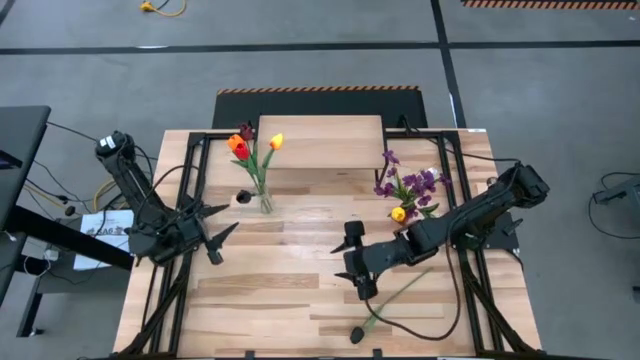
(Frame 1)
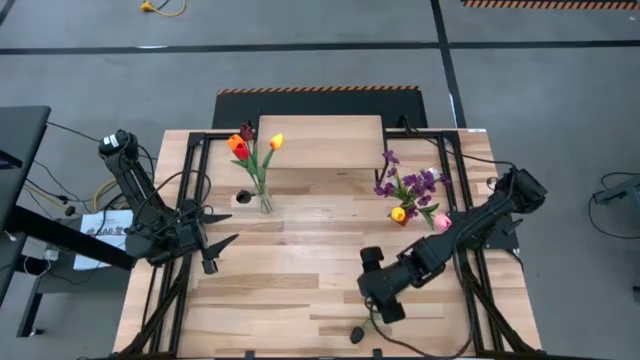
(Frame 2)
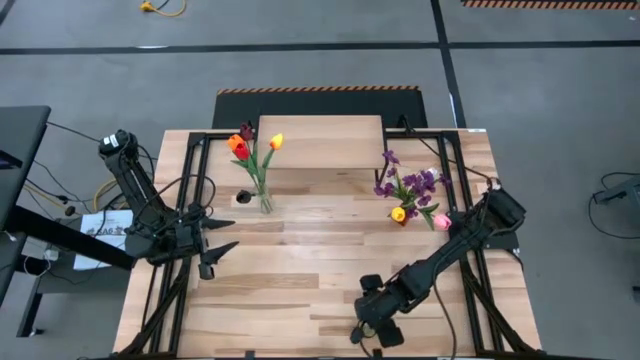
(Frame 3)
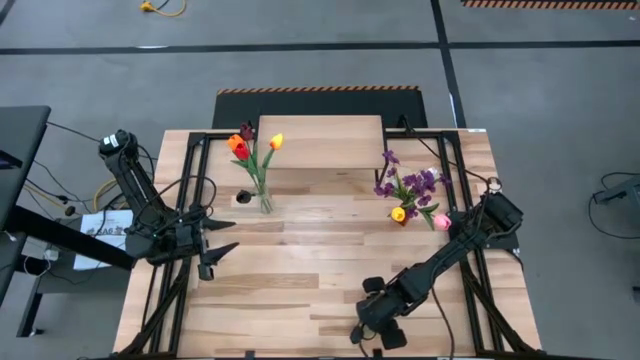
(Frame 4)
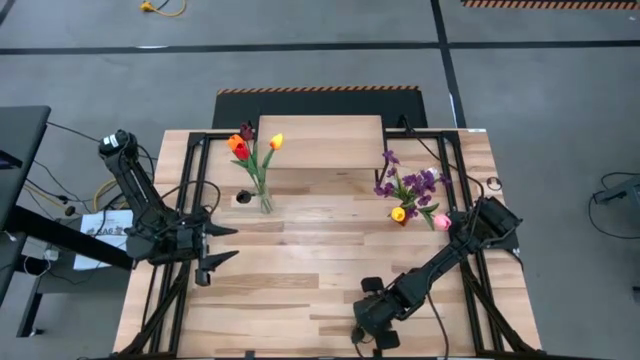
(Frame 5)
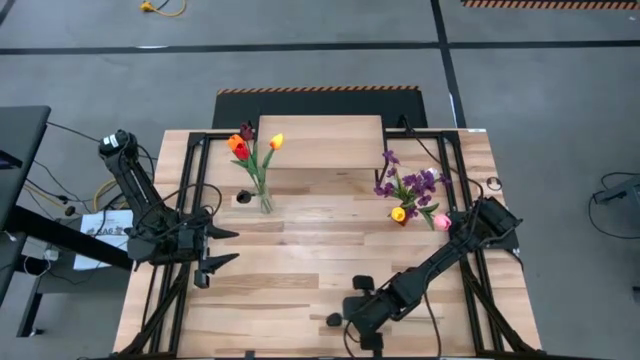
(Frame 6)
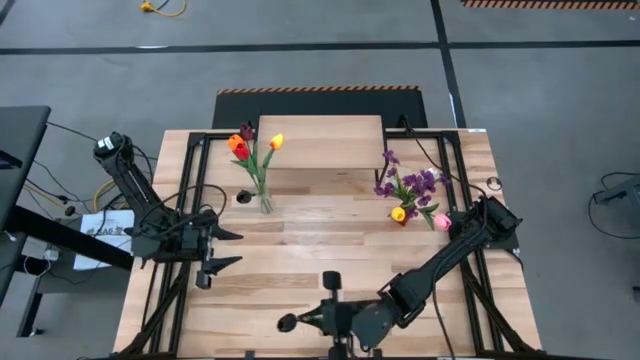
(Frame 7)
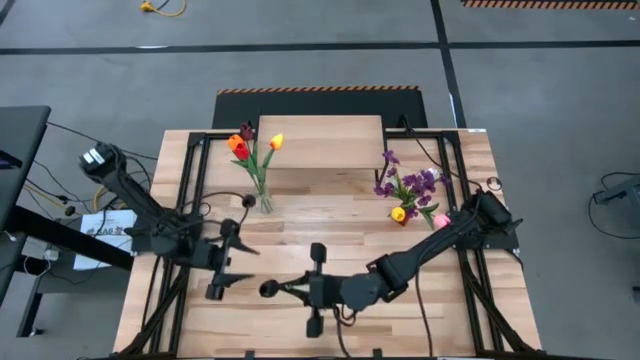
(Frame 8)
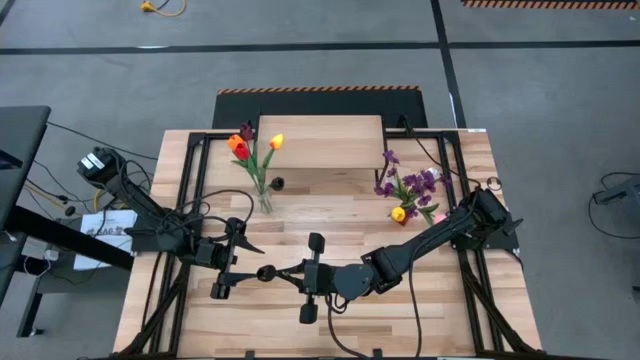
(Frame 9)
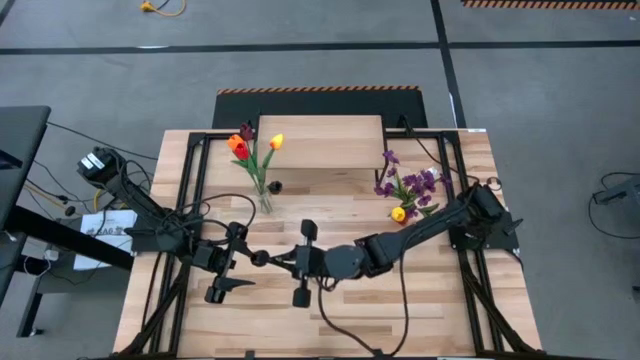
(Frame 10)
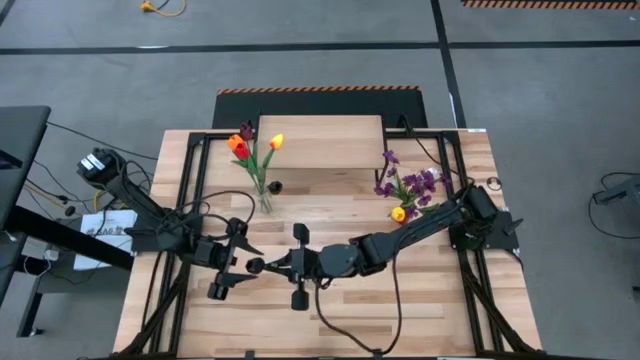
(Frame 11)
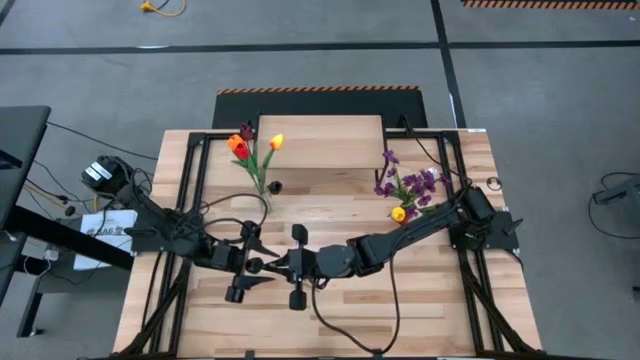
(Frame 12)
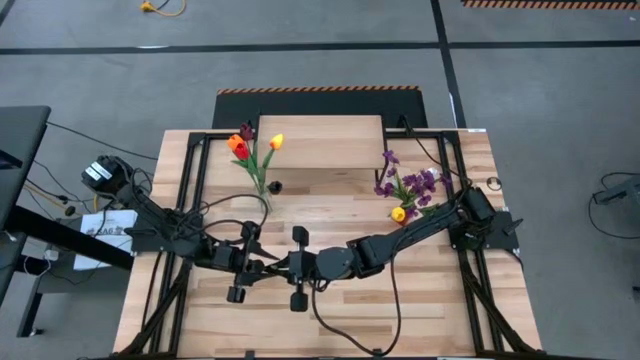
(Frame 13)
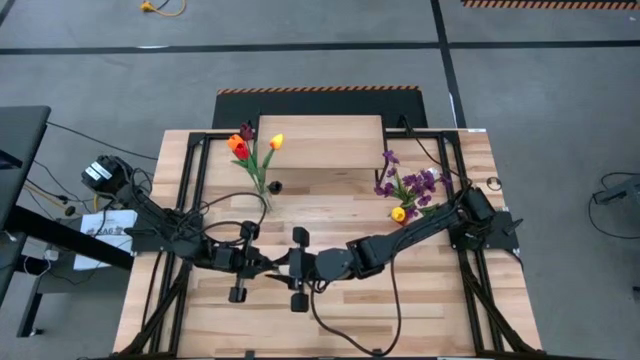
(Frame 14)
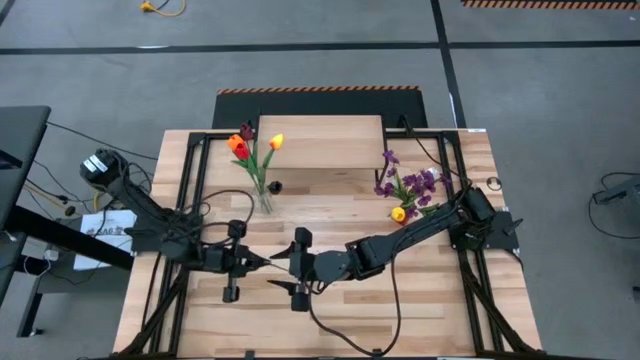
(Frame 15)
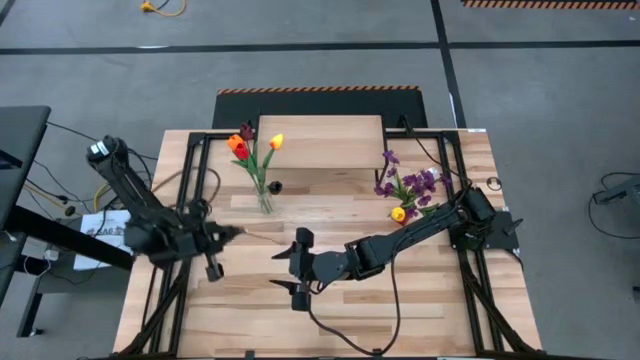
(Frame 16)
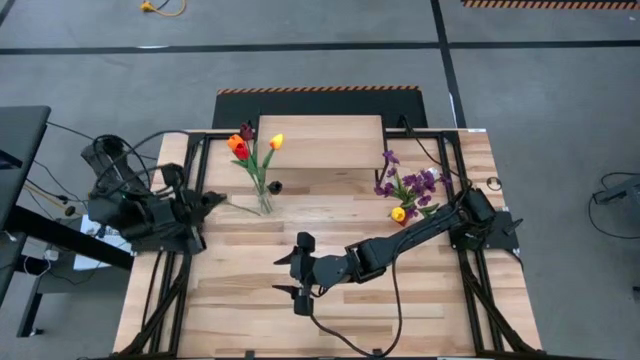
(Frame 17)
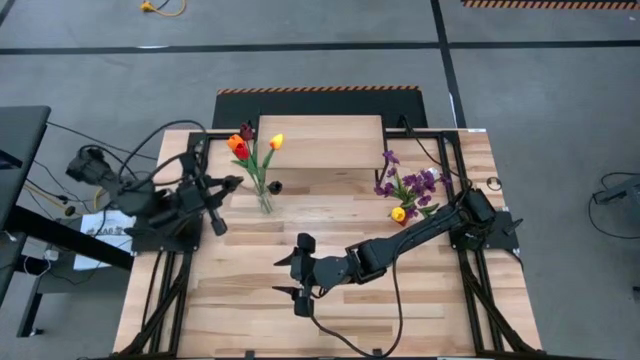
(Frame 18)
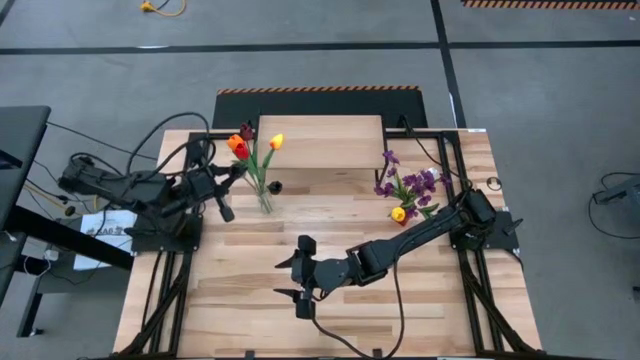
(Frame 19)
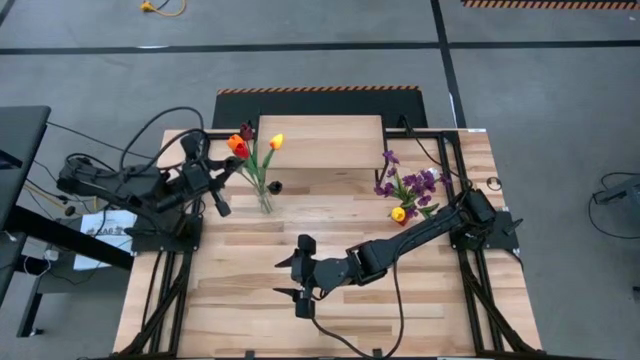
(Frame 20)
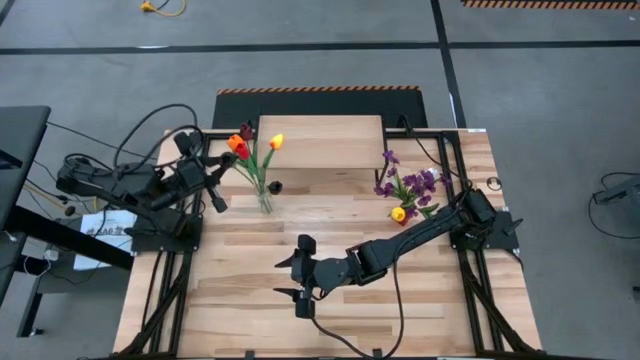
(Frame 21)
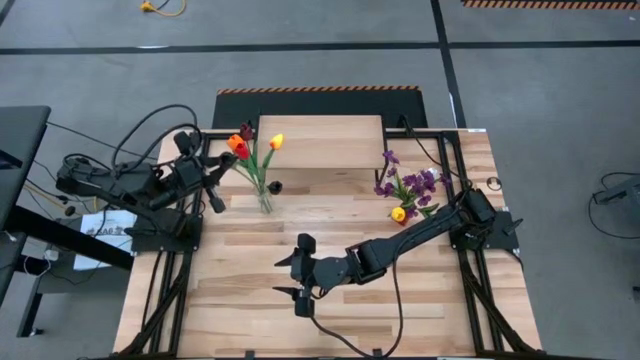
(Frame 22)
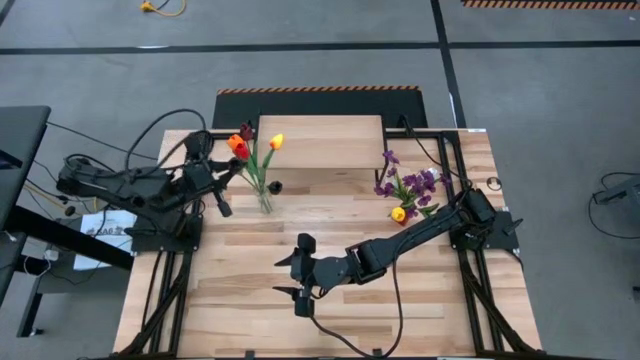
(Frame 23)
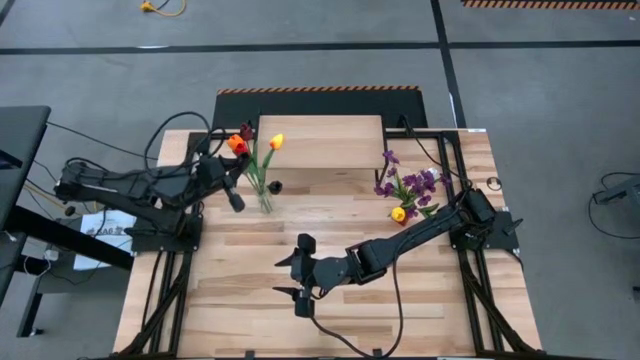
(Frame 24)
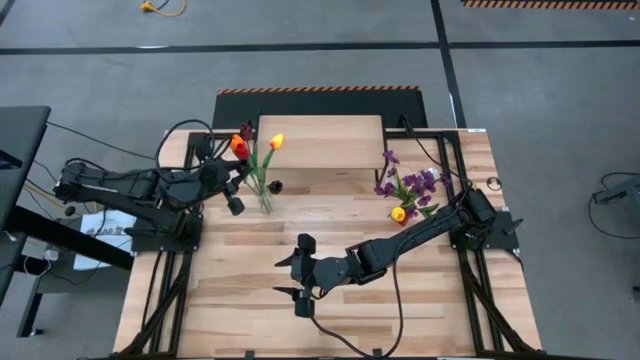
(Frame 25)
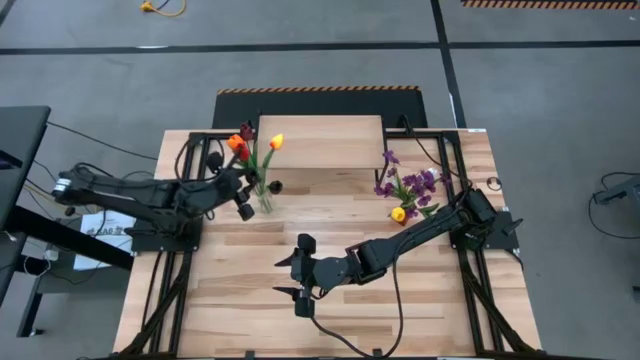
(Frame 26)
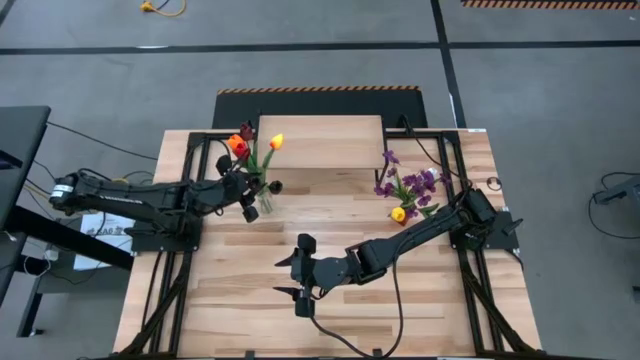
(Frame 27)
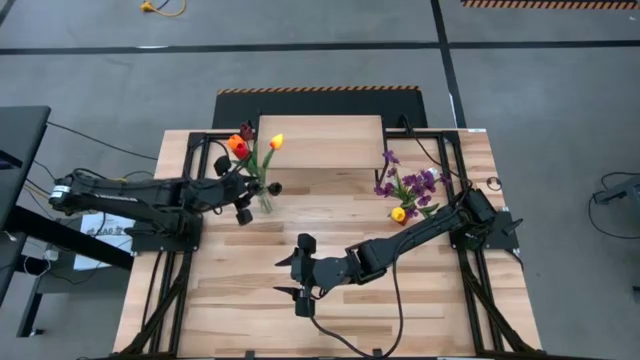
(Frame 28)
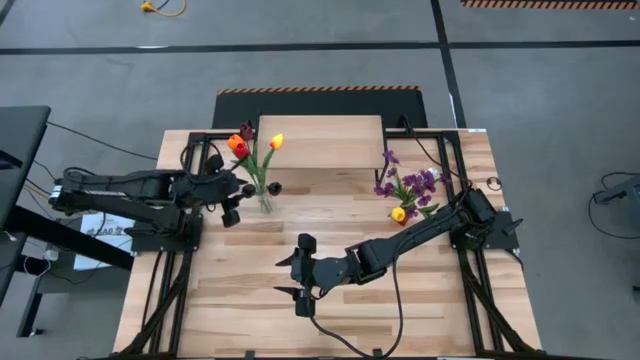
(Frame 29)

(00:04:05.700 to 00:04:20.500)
Task: Pick and place flowers into a vace then onto a shelf
Put the black flower into the transparent vase

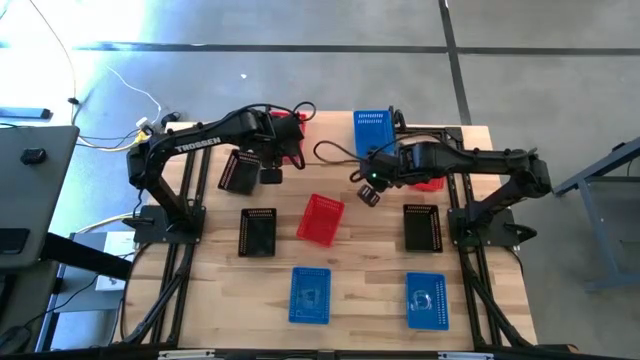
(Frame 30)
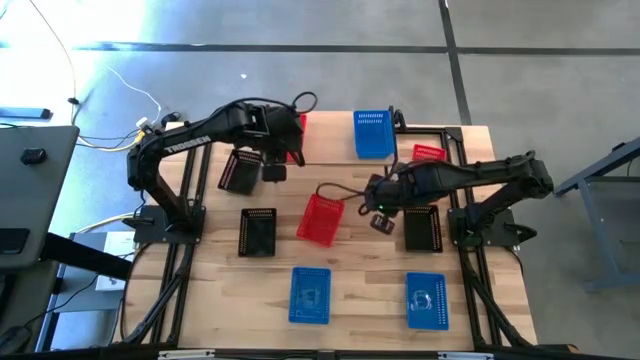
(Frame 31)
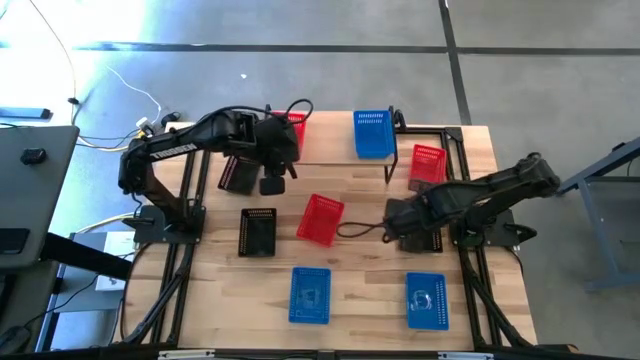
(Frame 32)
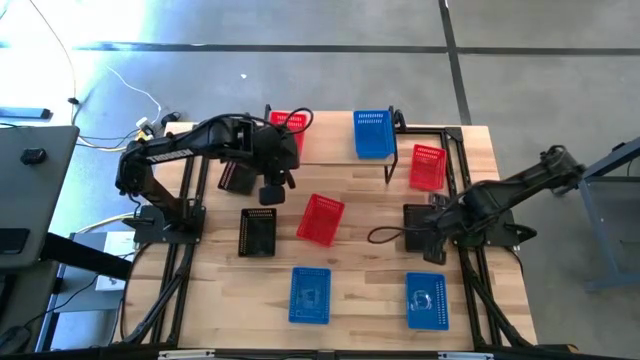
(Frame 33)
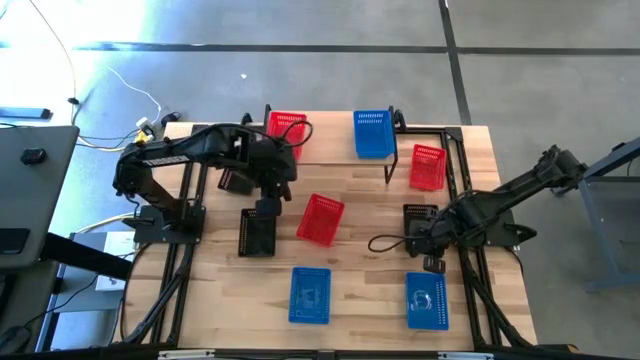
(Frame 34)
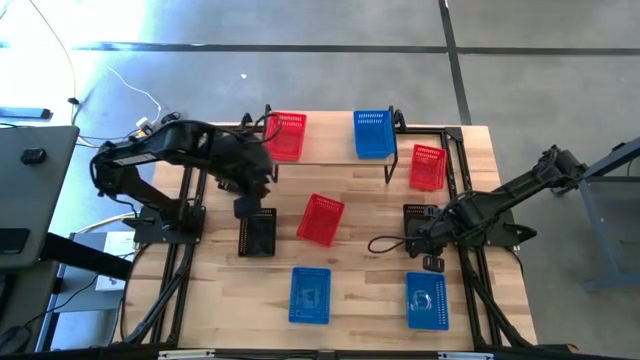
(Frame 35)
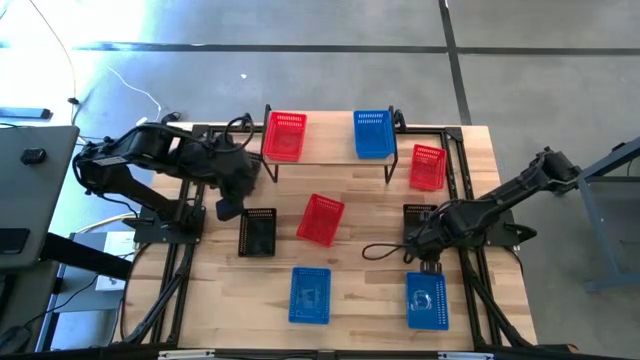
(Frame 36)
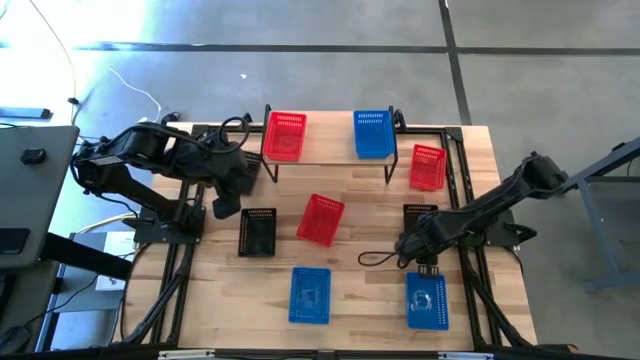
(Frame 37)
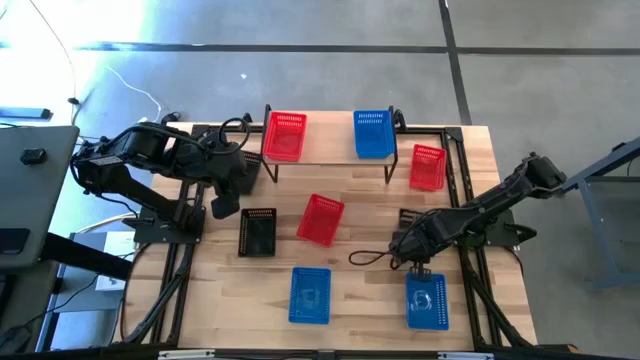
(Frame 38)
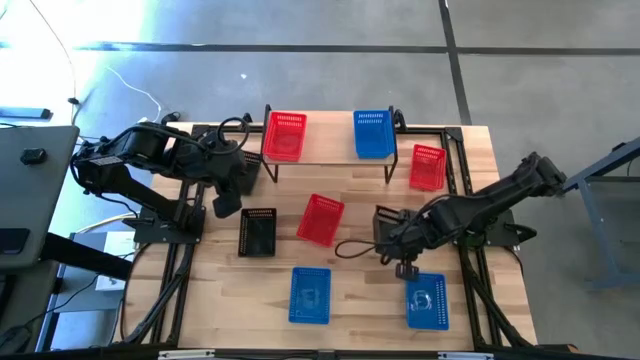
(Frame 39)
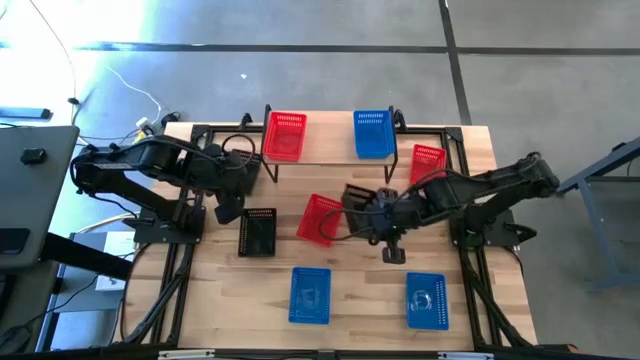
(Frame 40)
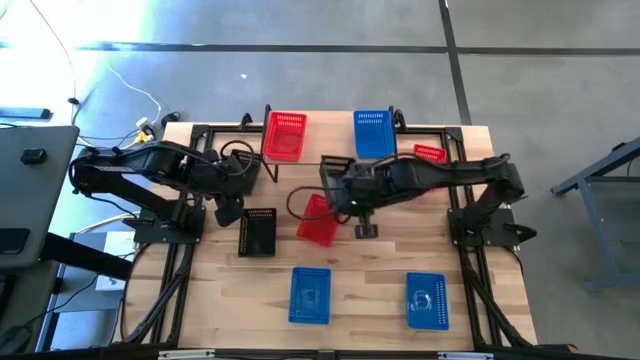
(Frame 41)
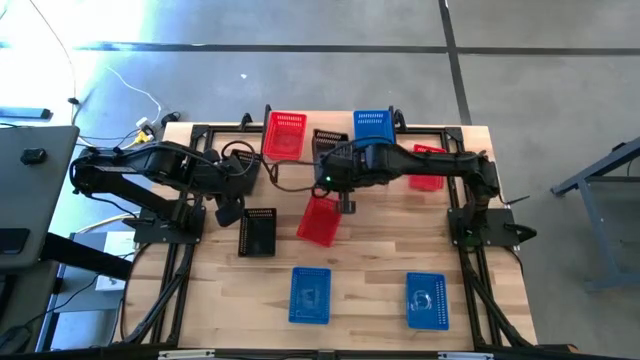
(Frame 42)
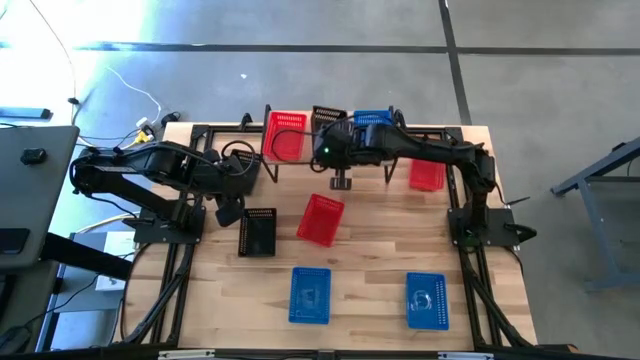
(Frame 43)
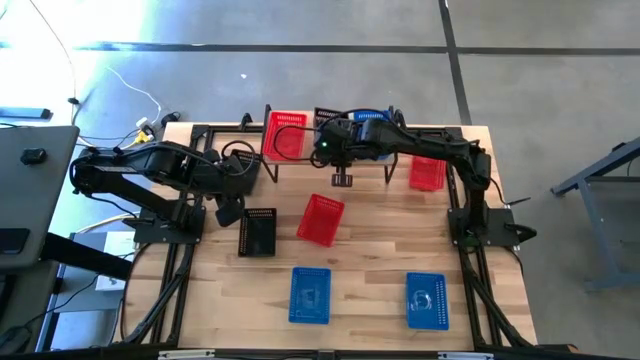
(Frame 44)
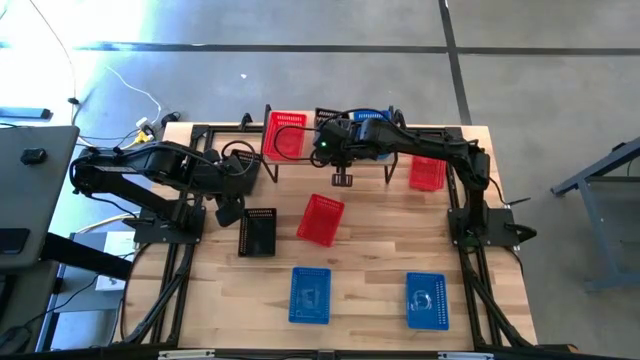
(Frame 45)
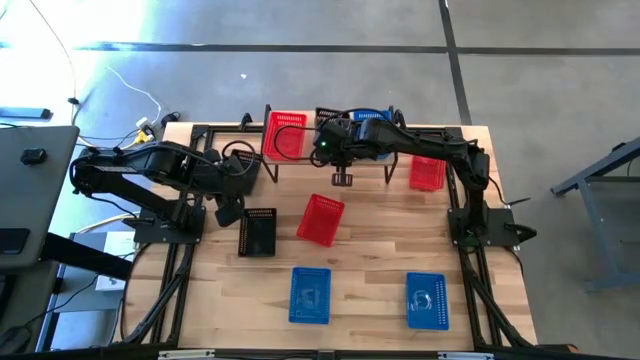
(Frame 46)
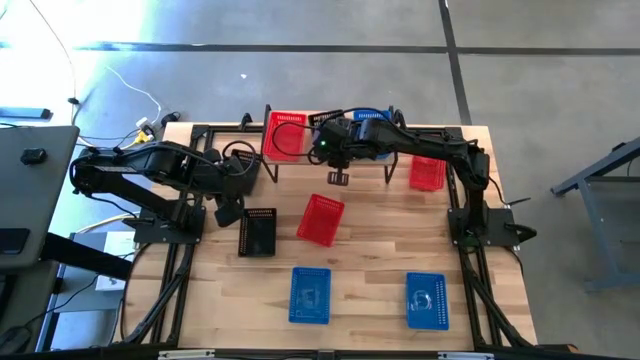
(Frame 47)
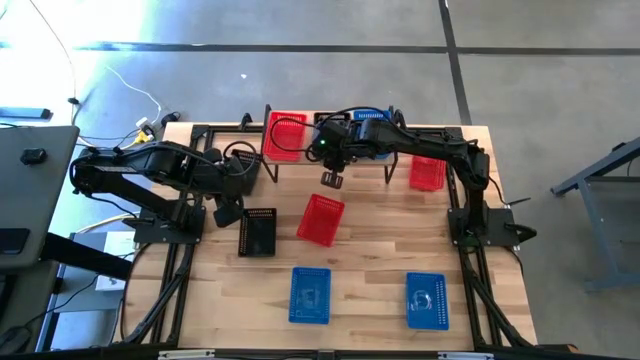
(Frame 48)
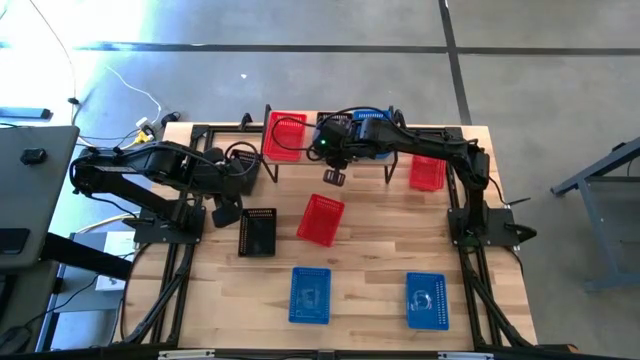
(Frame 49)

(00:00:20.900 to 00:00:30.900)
Task: Stack baskets on shelf by color
Put the bottom right black bin on the shelf
